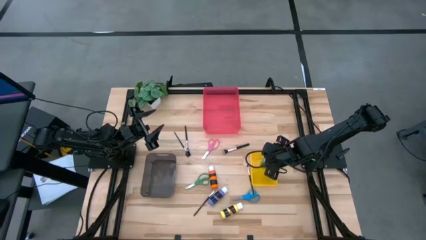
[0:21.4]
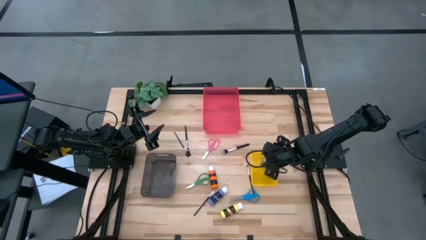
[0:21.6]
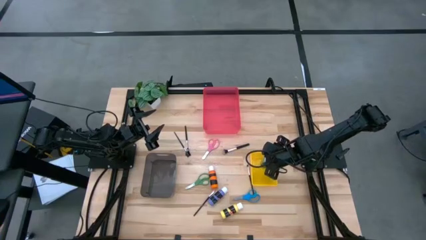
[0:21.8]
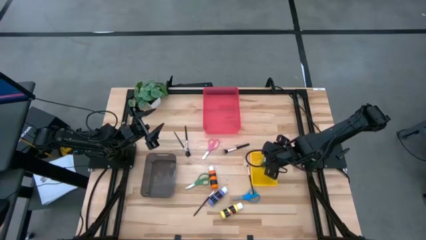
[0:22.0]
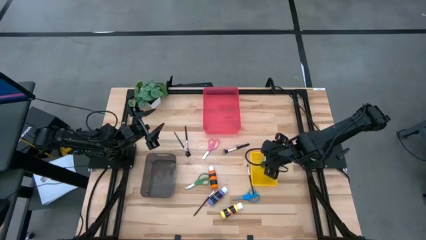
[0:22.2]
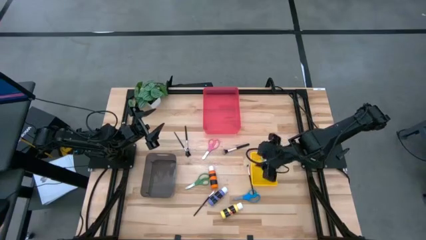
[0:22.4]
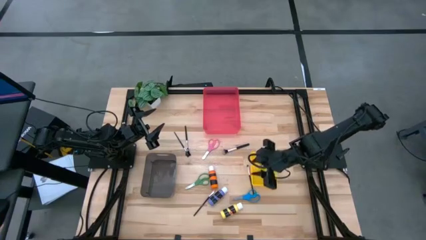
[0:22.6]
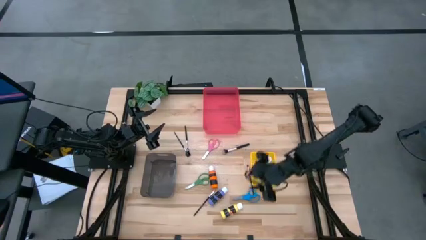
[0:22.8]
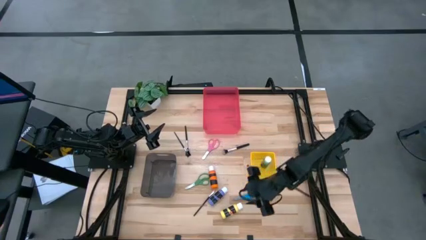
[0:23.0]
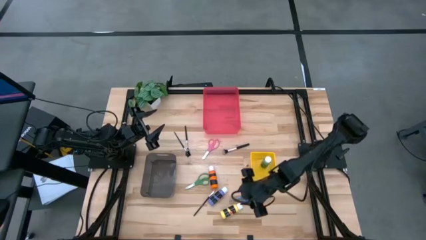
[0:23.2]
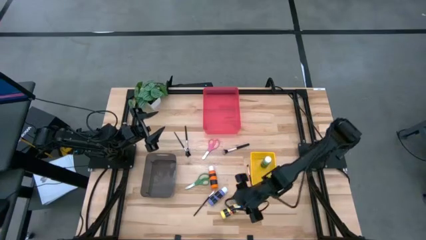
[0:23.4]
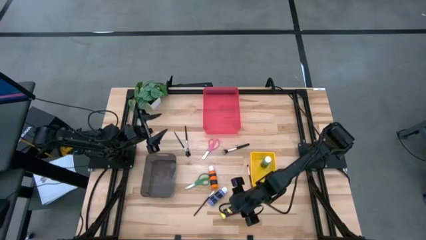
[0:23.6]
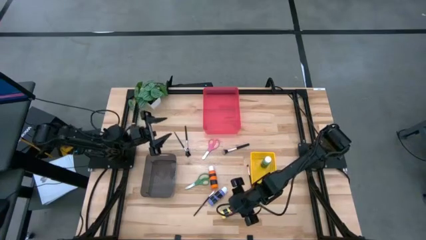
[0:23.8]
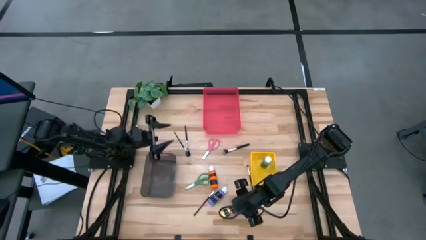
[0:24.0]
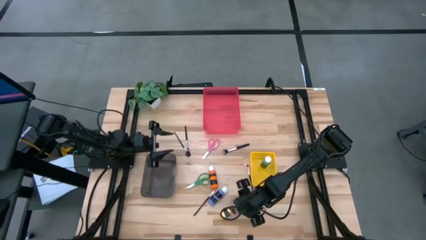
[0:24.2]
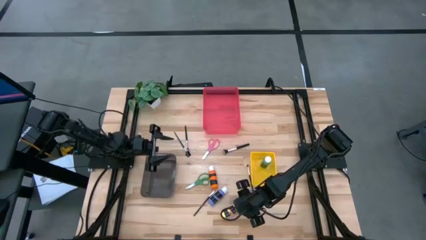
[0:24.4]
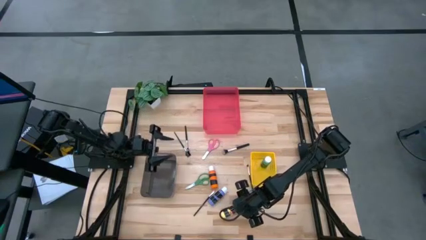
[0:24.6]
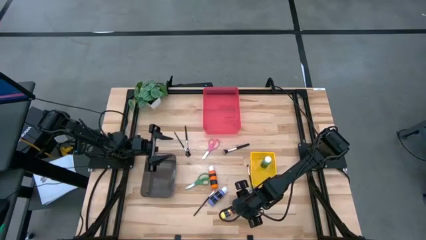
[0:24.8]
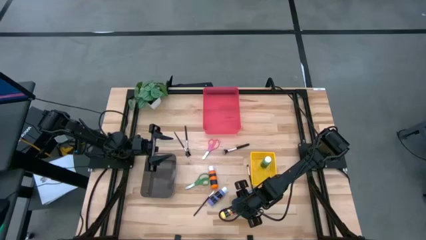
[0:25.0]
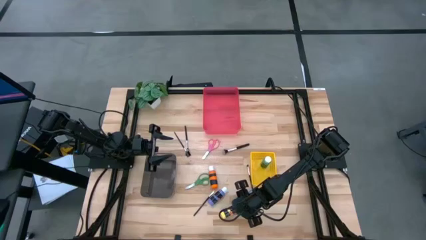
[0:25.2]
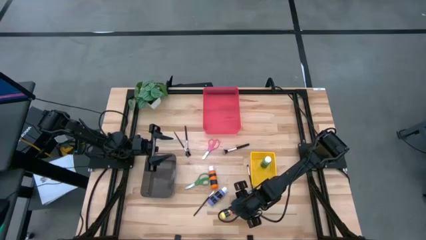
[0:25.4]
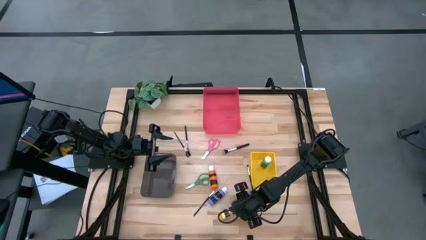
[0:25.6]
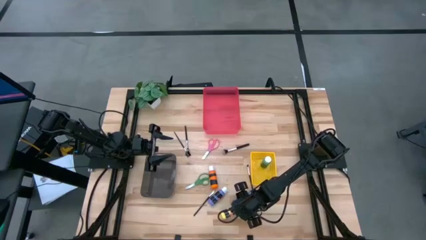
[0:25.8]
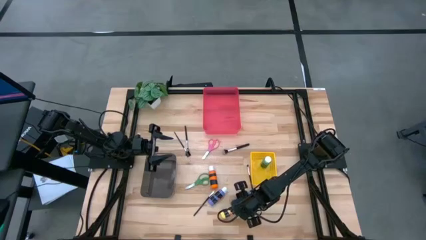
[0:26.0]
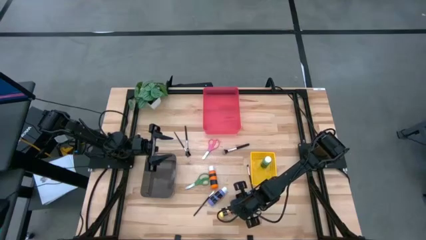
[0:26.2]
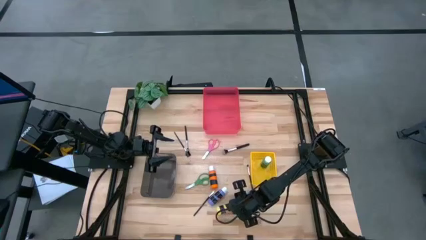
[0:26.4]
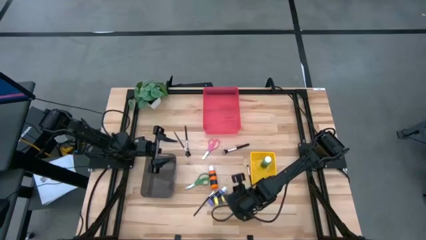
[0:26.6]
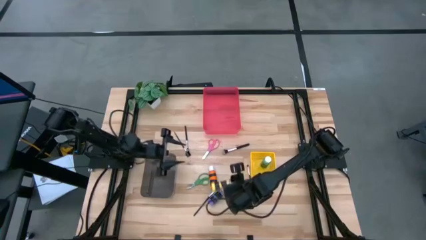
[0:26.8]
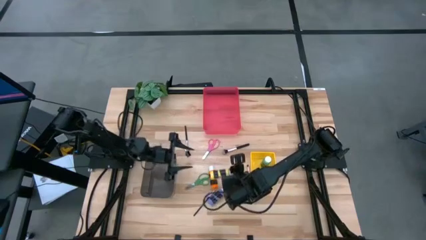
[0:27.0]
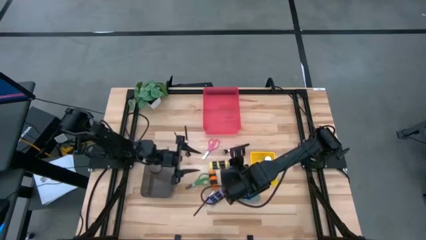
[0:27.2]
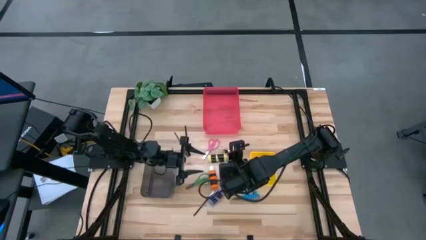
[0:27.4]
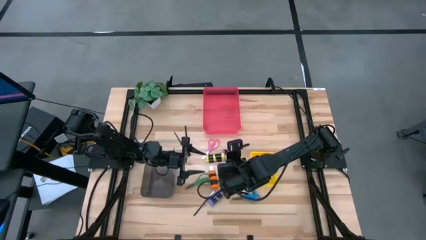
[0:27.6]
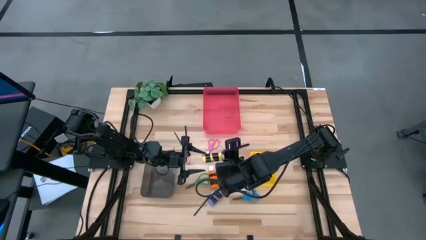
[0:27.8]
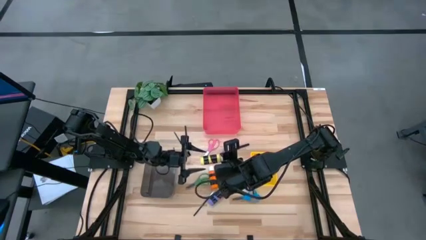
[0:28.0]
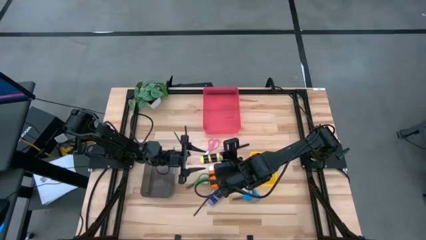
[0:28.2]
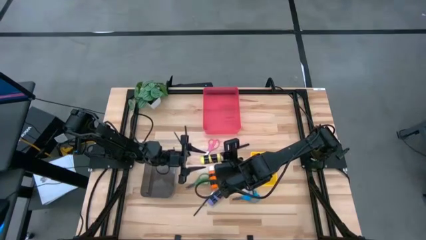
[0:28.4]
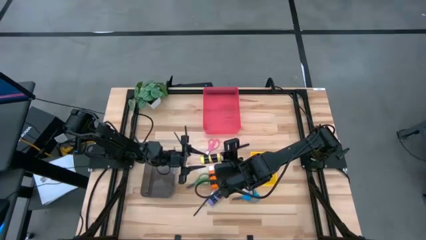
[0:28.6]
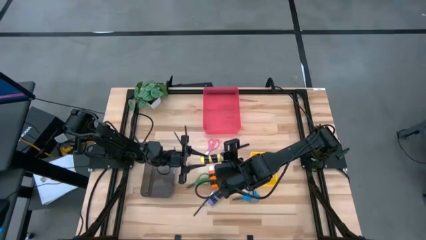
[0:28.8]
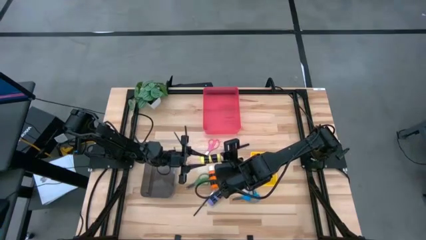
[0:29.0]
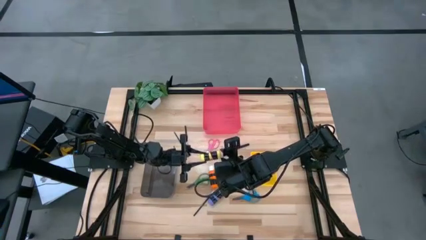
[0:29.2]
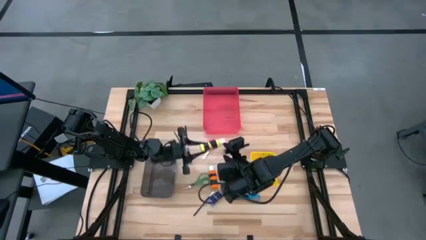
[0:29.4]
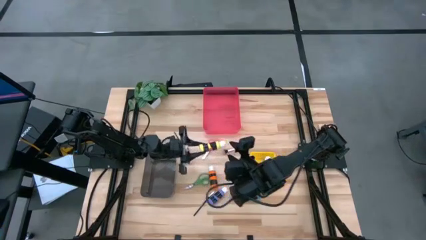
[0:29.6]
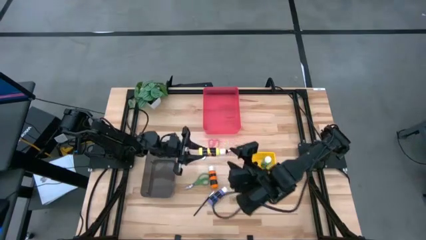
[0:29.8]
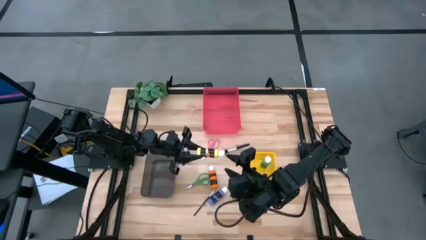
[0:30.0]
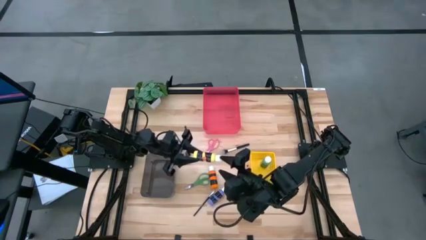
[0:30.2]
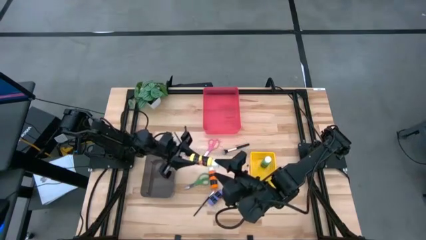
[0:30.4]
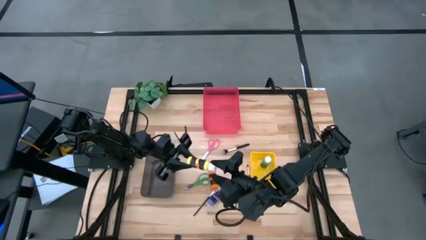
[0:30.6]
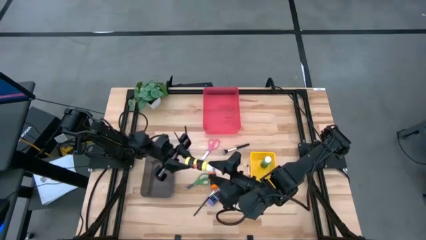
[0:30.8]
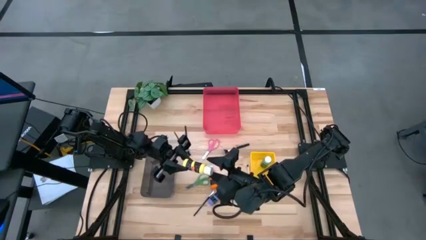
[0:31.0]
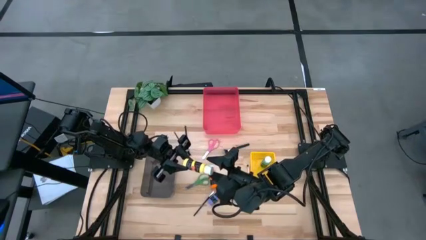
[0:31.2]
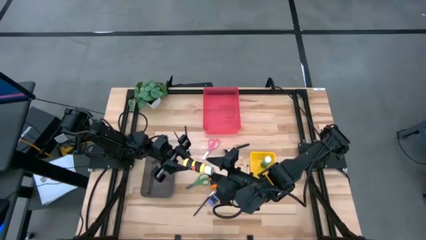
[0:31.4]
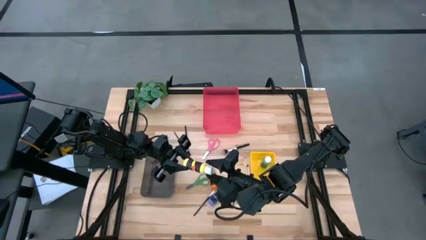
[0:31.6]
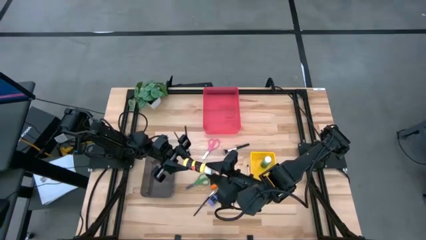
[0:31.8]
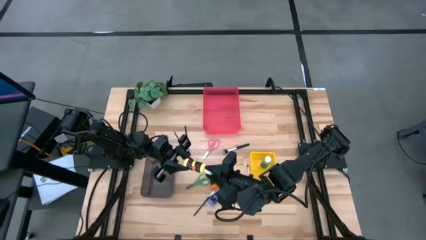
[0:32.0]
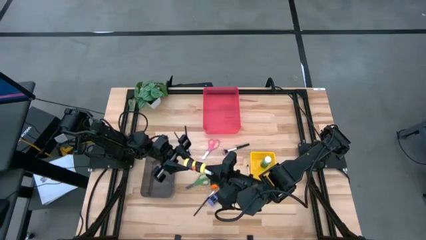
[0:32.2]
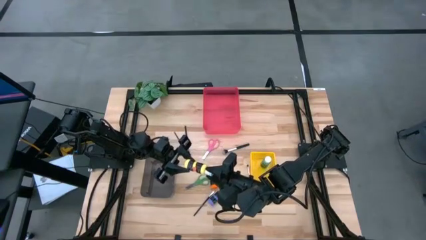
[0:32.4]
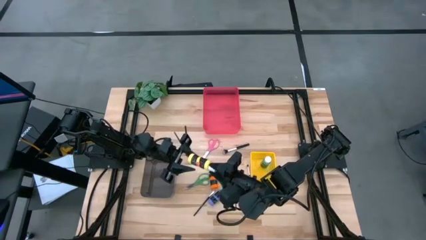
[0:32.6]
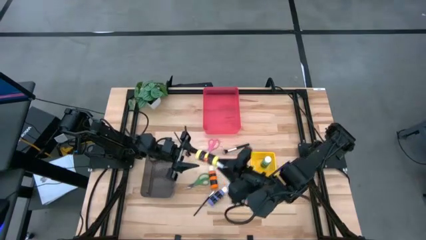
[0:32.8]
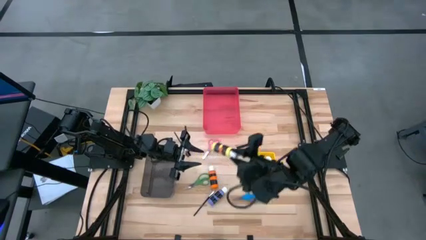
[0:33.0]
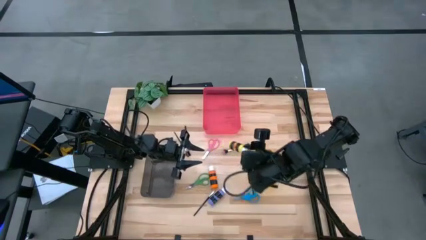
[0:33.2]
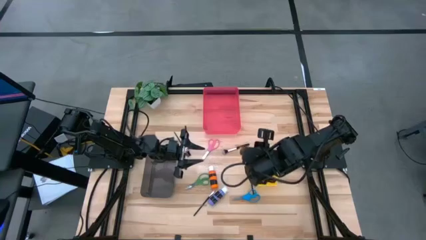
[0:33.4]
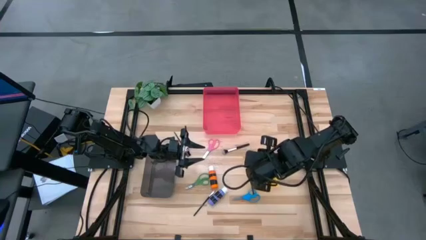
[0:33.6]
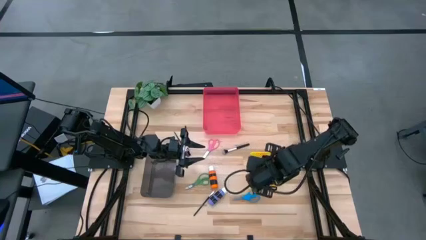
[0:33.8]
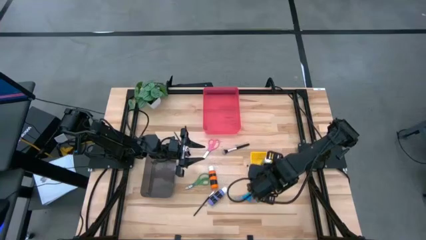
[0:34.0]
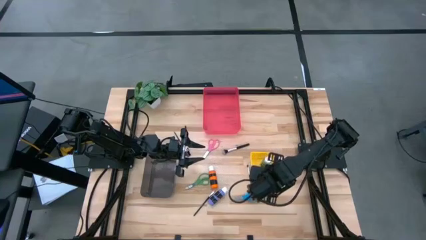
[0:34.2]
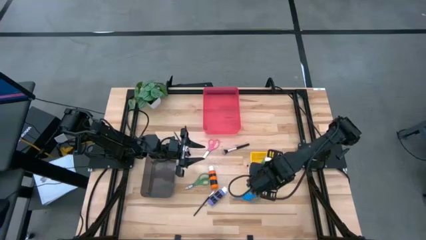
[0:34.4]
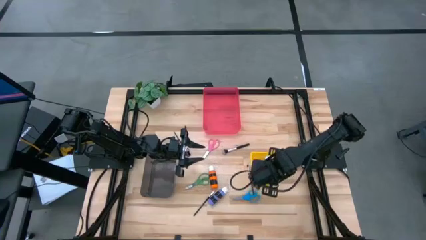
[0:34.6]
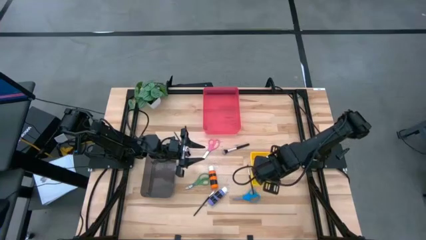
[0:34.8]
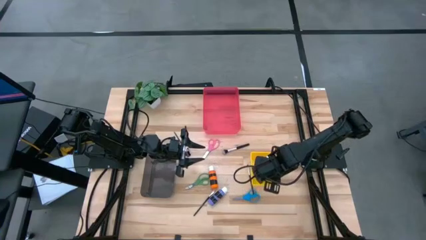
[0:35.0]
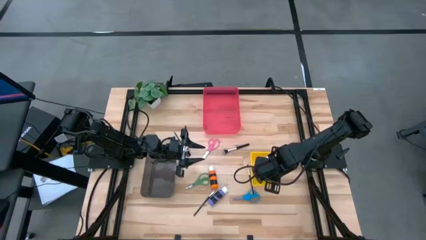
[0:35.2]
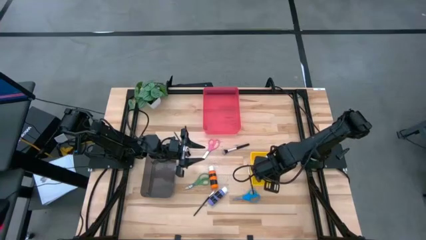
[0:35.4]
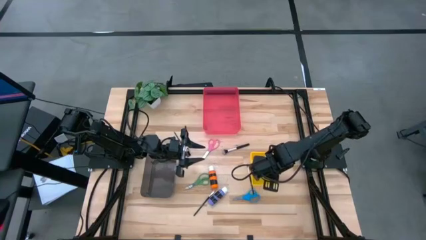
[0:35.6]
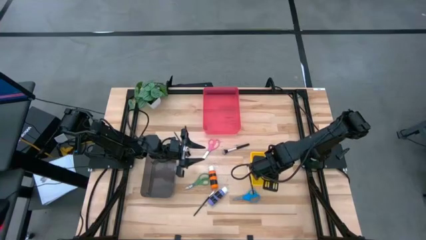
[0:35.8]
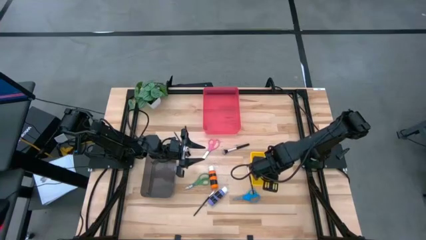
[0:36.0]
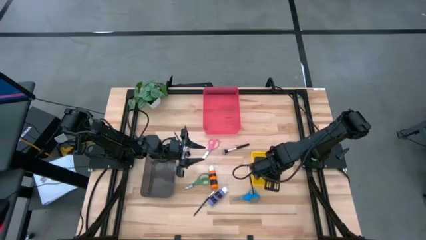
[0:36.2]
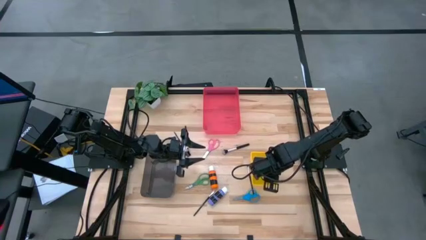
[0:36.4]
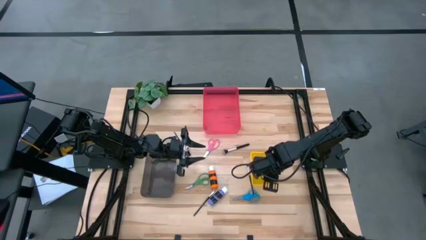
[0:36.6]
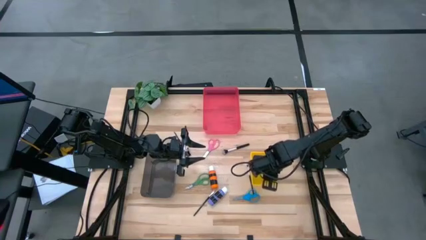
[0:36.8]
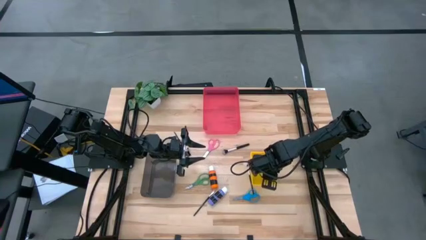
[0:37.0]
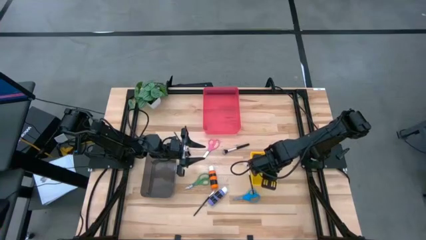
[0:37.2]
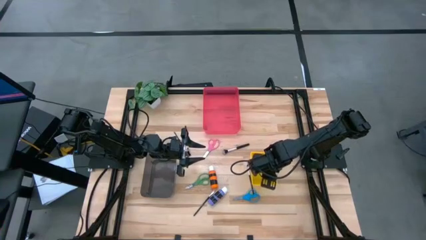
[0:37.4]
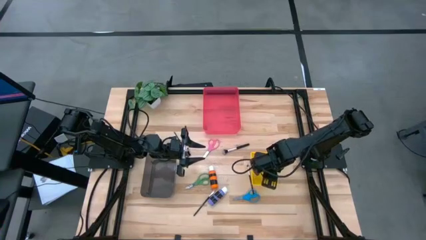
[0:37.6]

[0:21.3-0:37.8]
Task: Pick & Place Paint Supplies
Put the yellow paint bottle into the yellow bin
